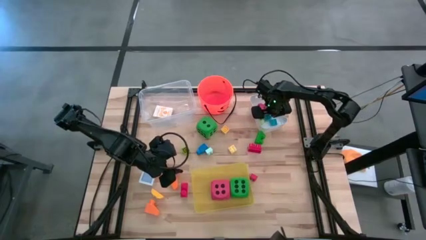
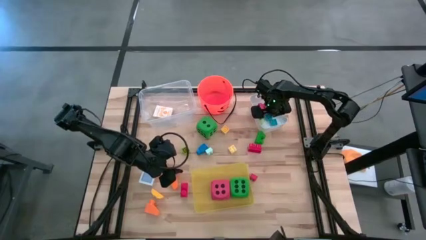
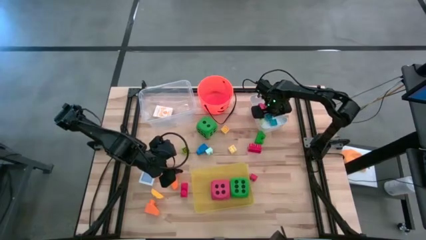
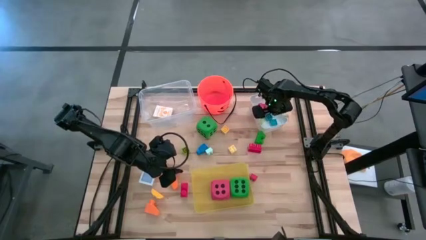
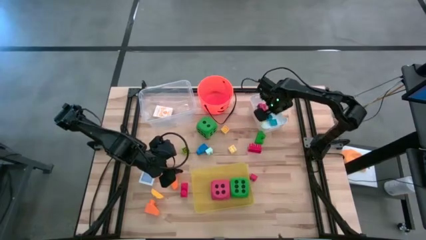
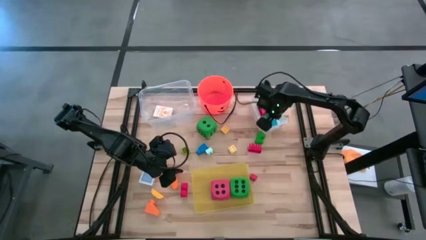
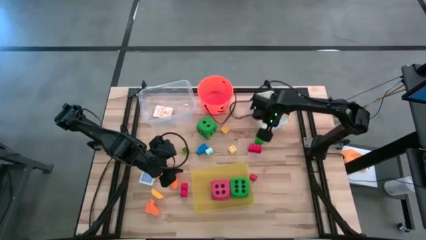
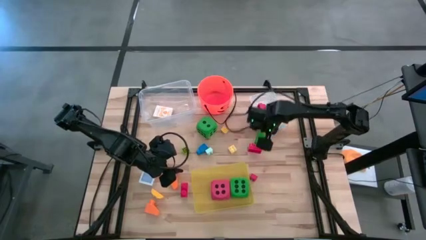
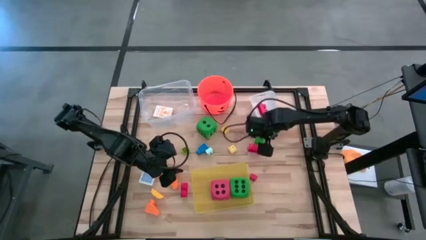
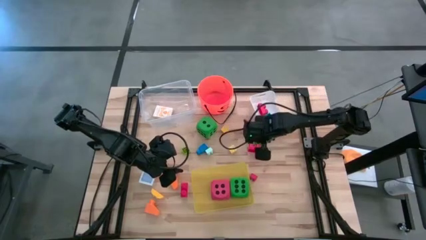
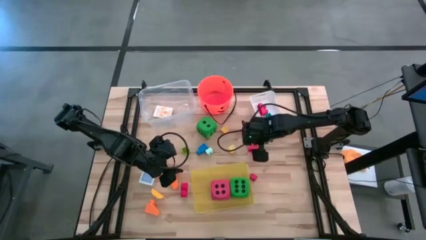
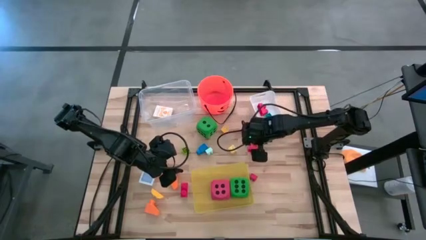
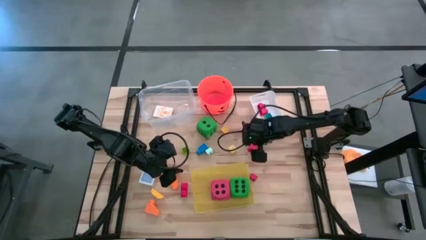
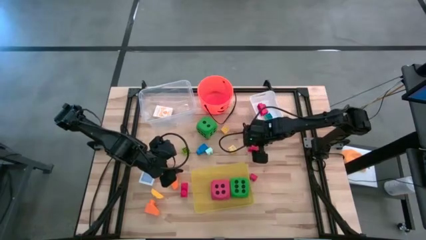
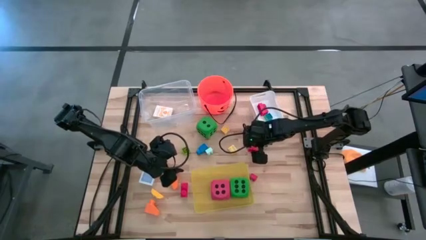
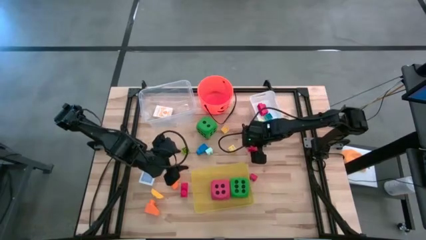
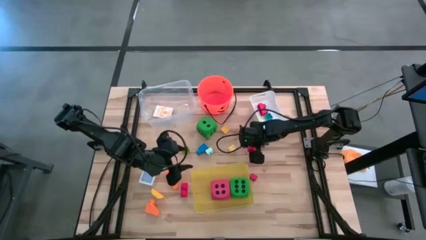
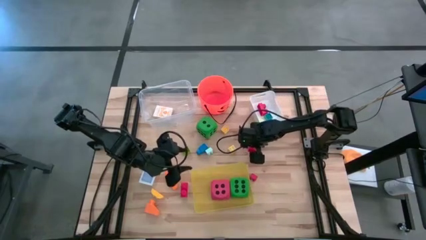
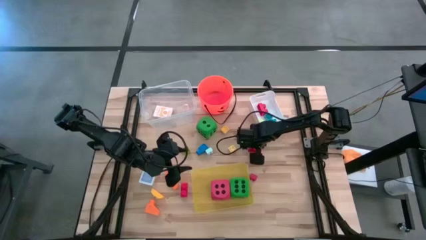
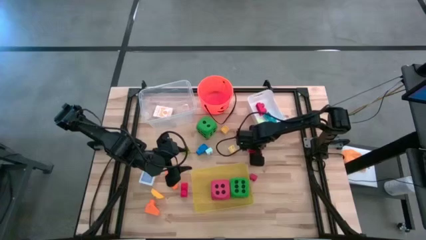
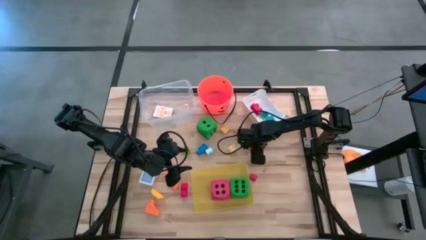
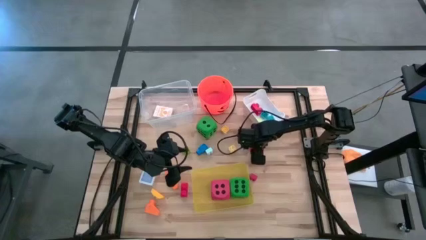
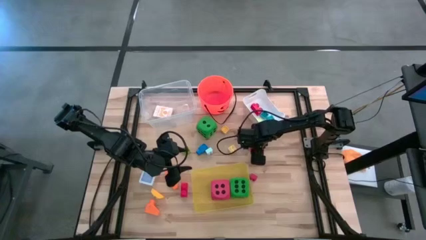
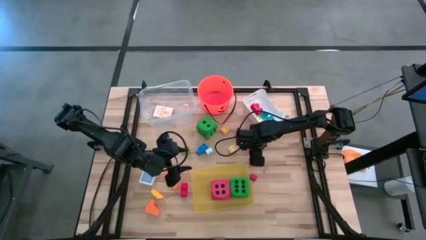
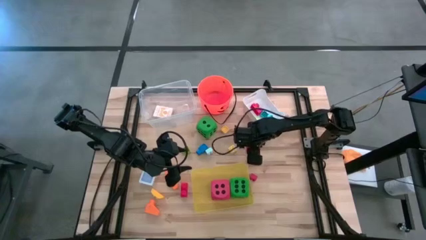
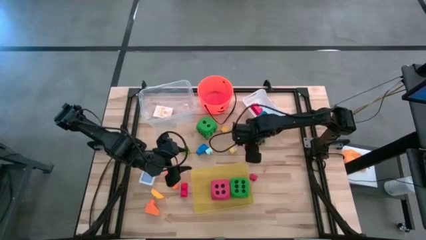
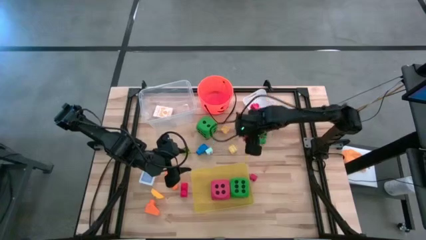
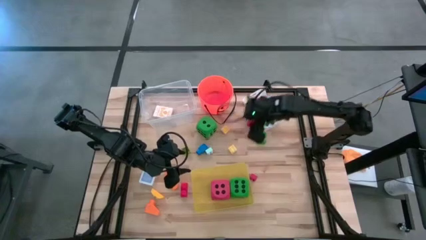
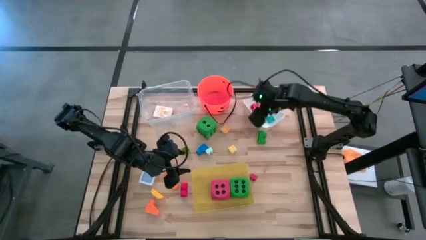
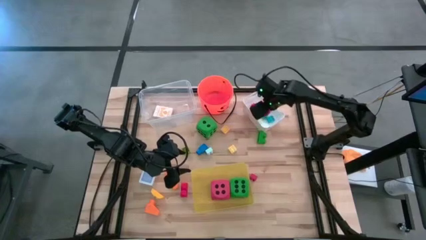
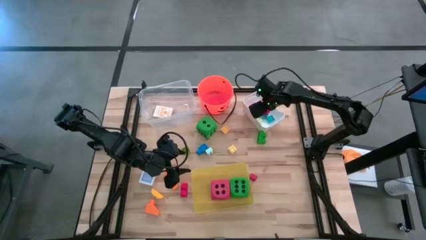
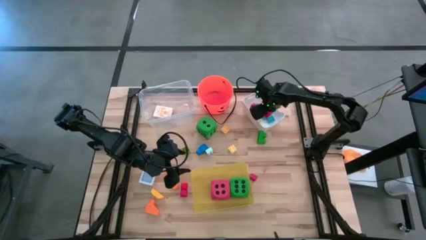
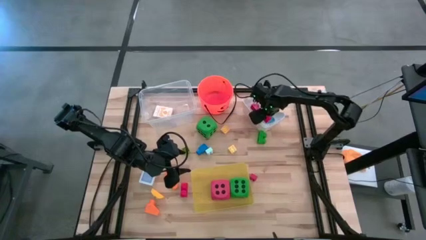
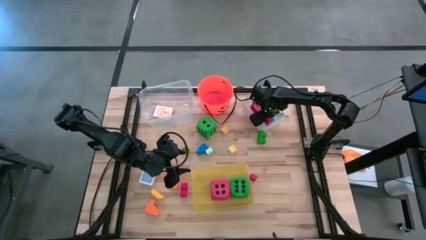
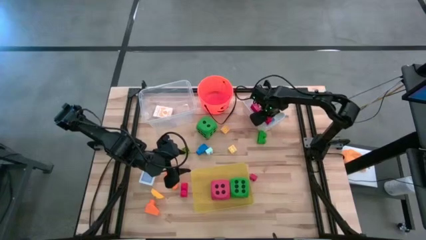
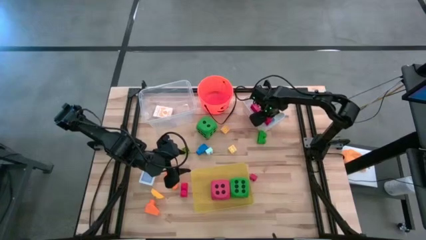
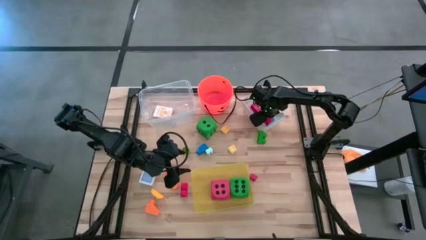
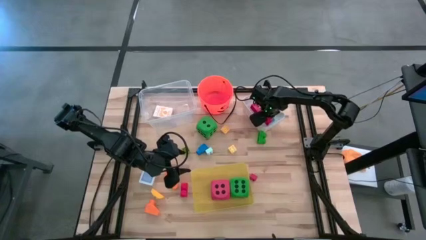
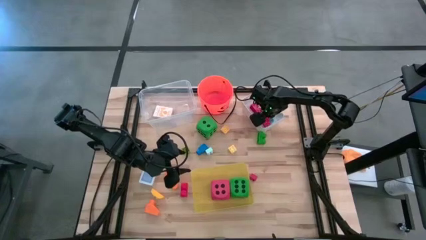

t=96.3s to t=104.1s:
Task: Pick & Place Toys
Put the red game piece into the white bin

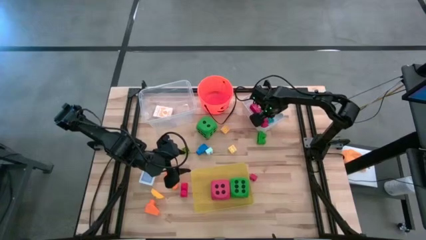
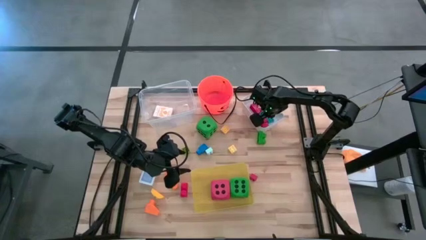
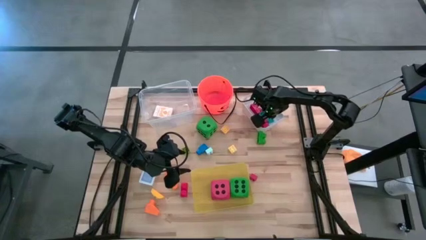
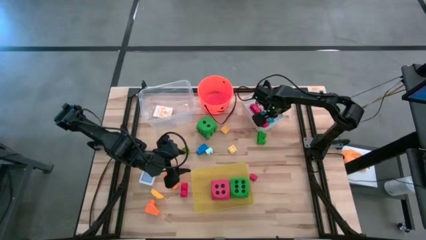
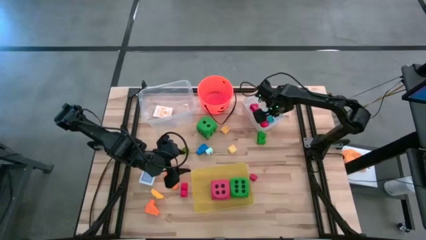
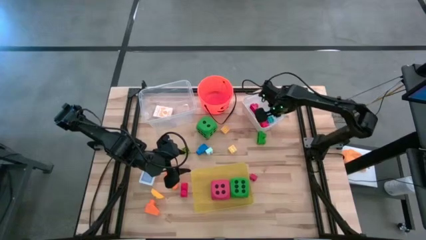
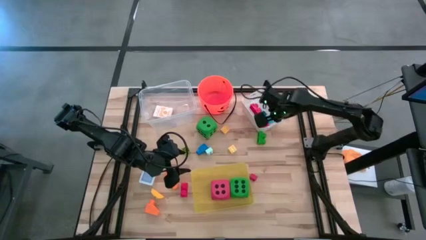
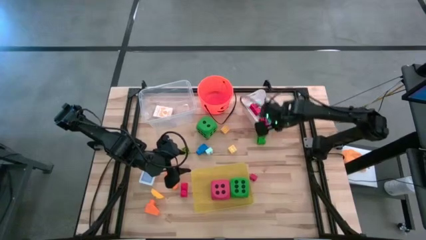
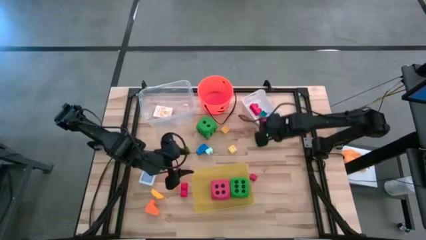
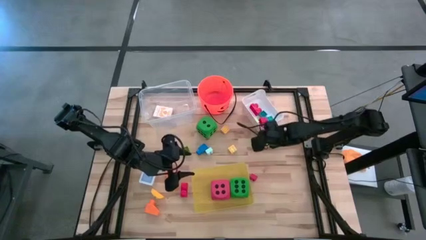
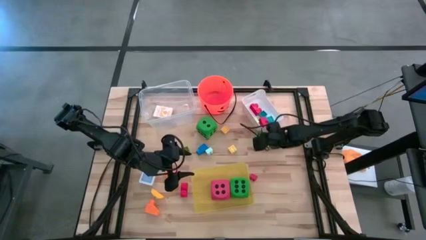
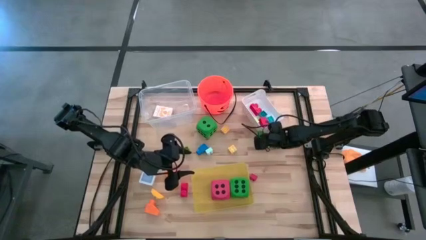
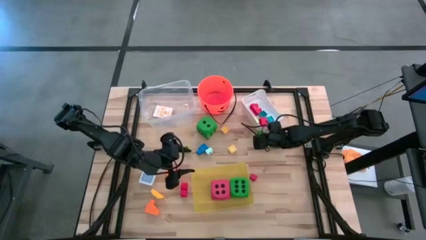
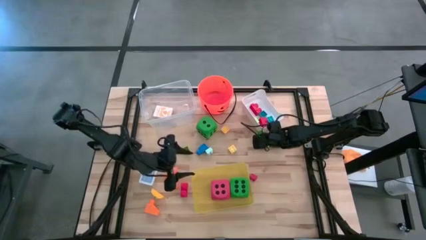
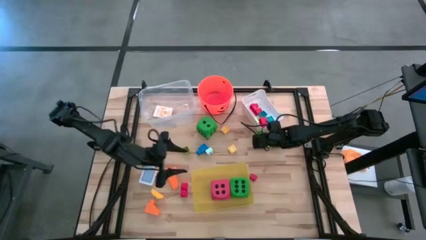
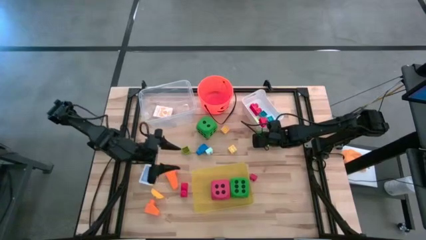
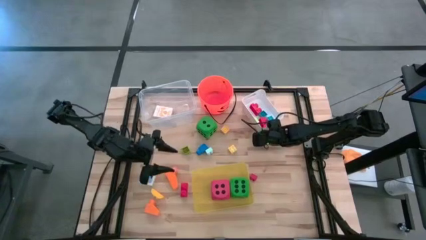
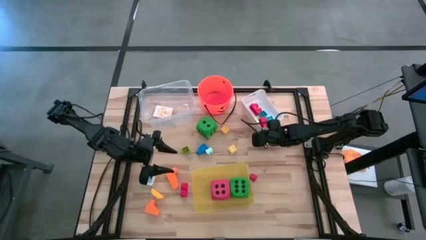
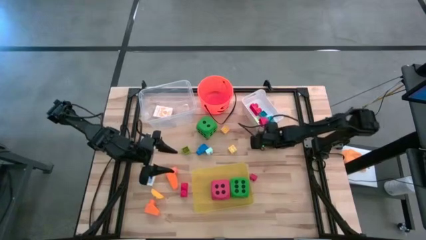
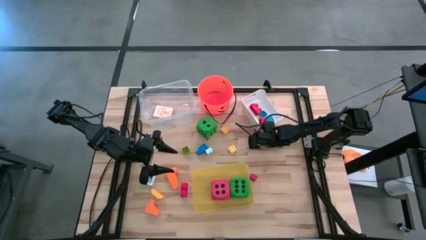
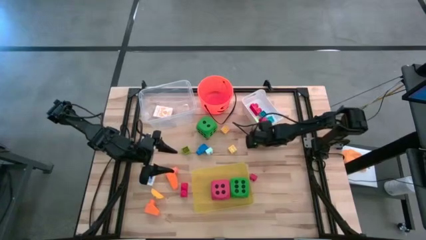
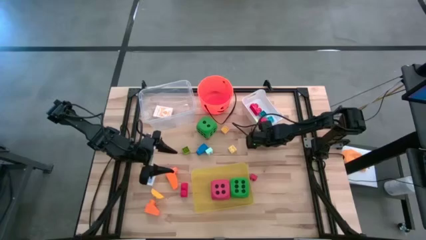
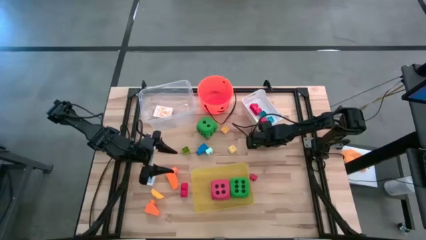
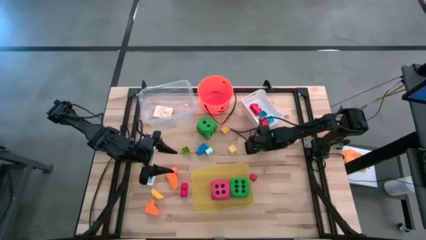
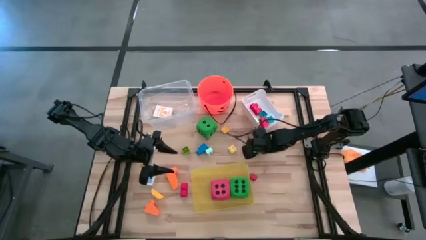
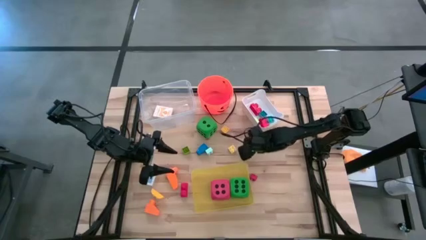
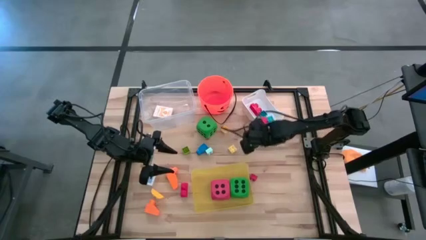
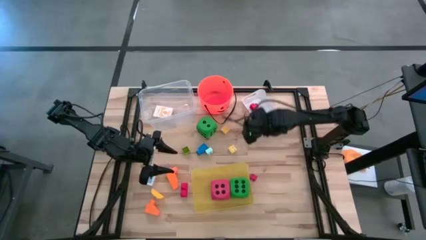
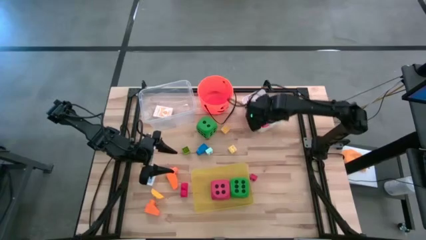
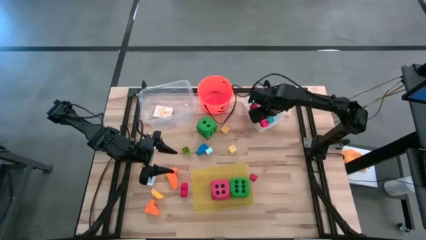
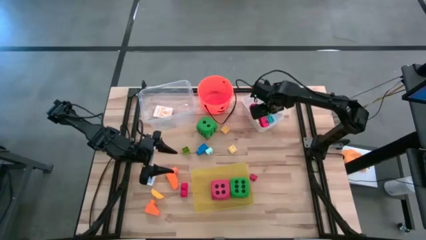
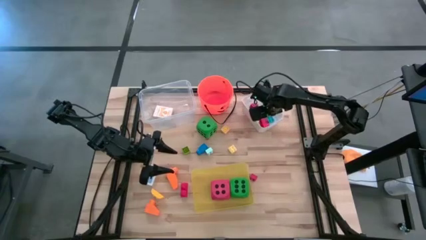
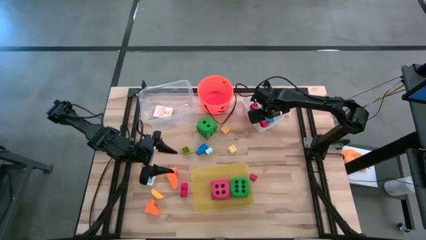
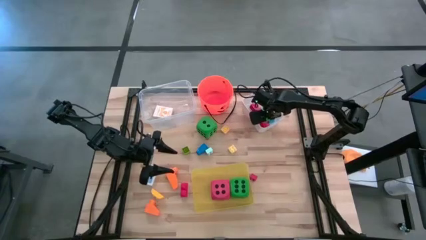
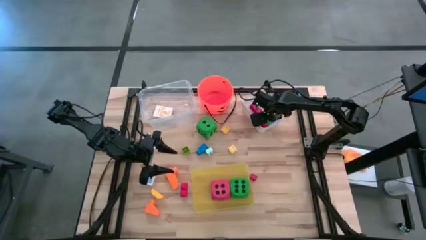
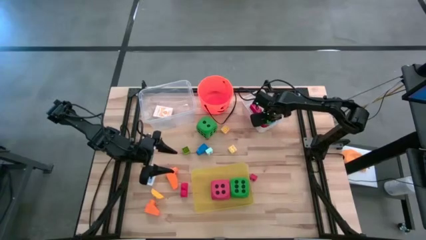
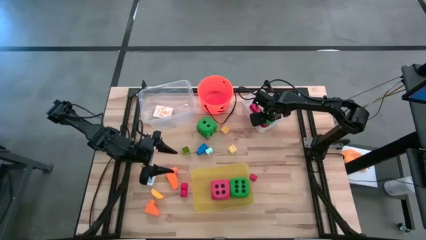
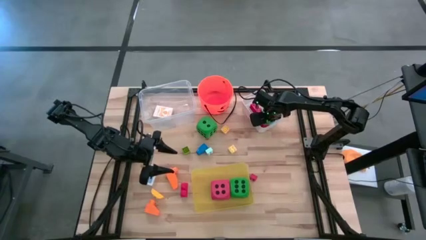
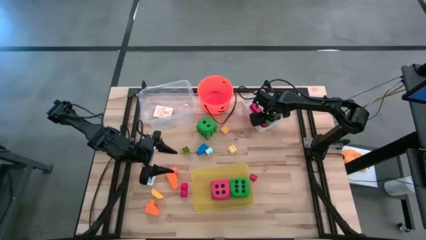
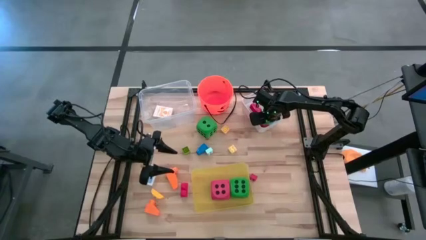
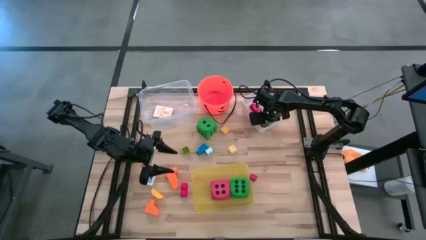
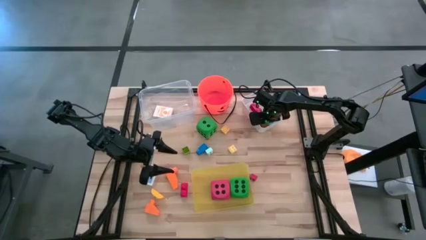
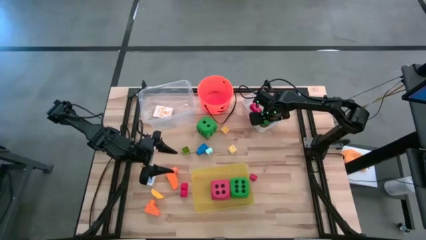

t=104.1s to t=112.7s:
Put the green game piece into the white bin
